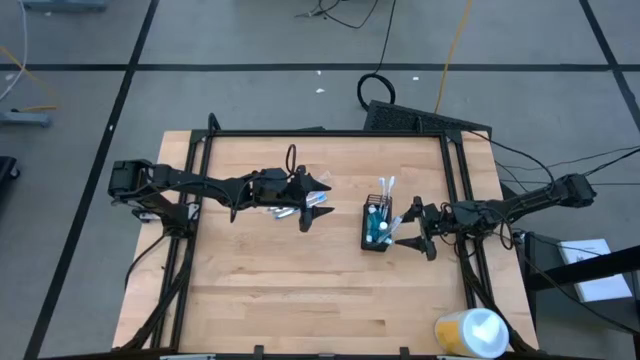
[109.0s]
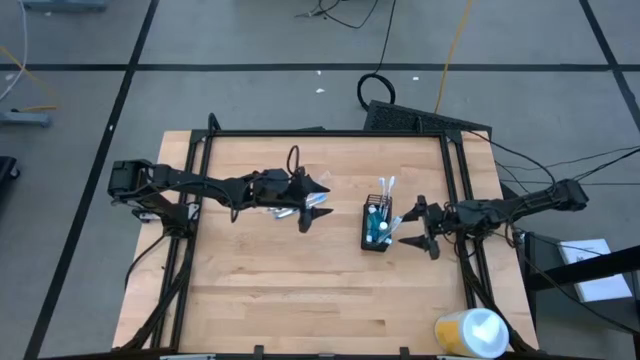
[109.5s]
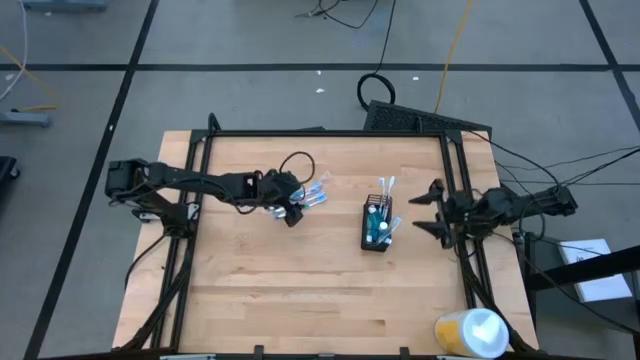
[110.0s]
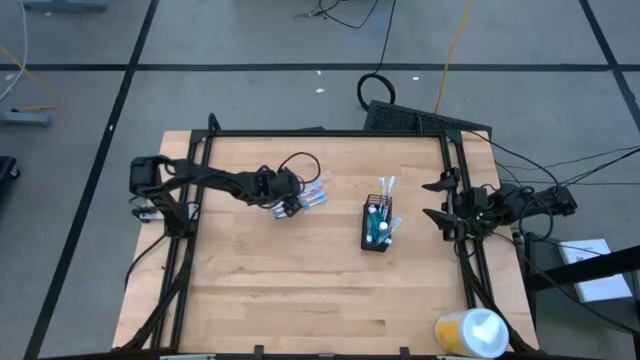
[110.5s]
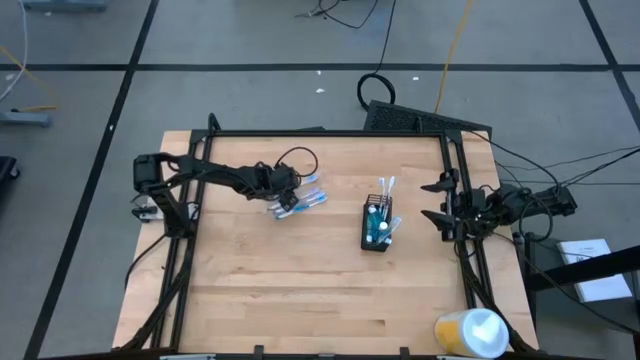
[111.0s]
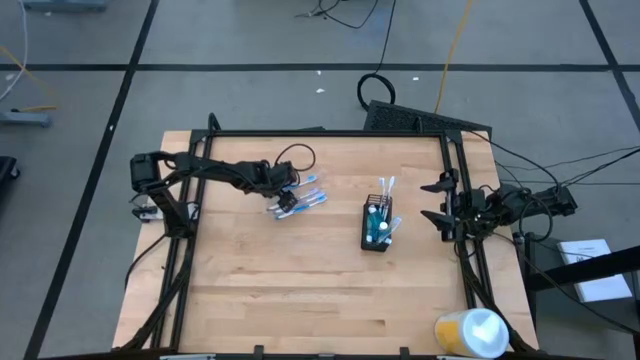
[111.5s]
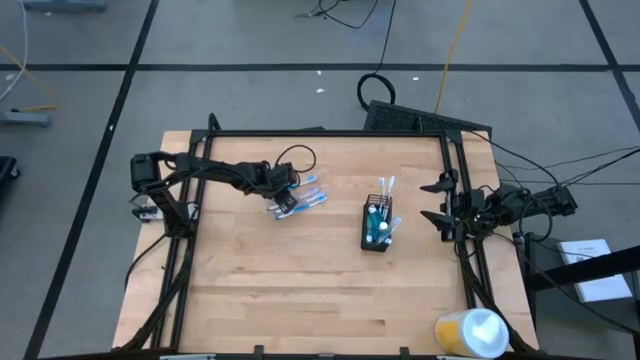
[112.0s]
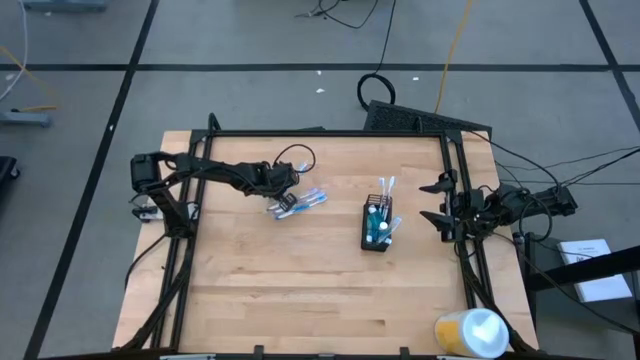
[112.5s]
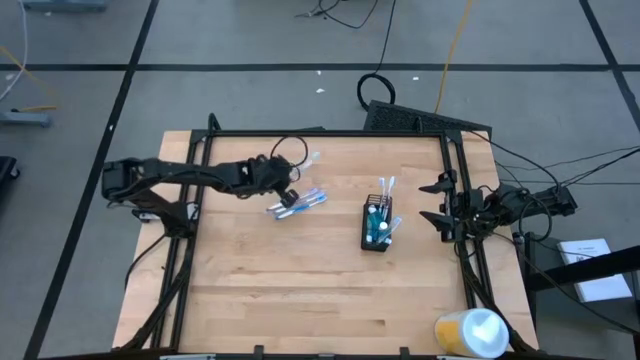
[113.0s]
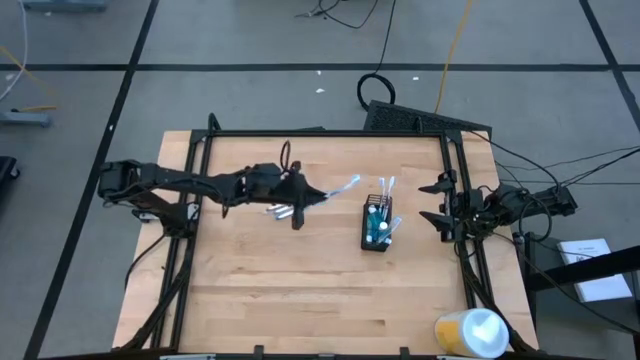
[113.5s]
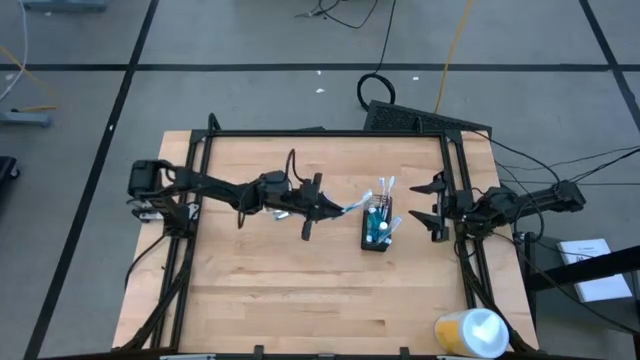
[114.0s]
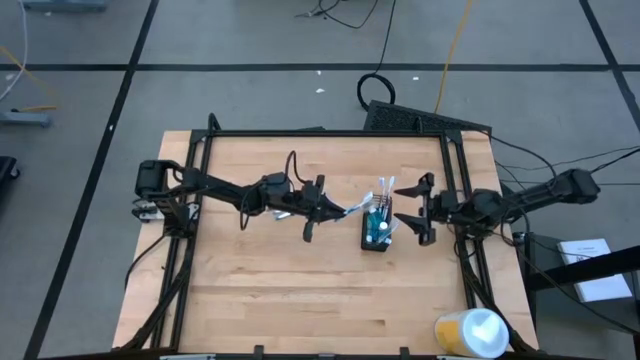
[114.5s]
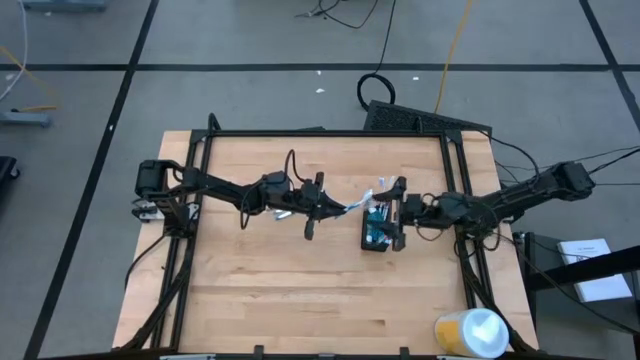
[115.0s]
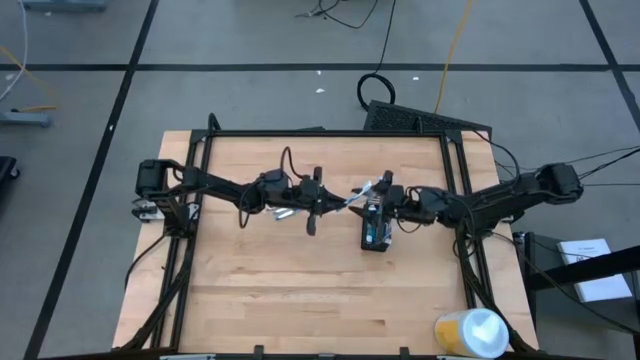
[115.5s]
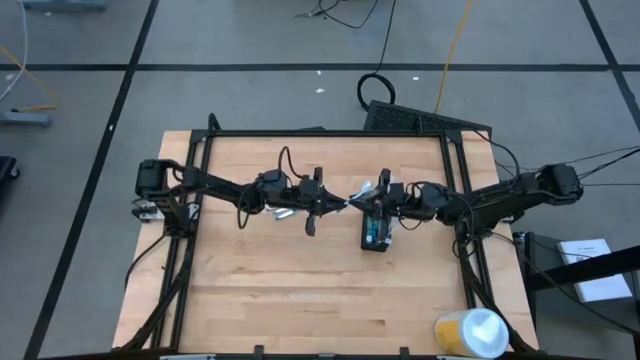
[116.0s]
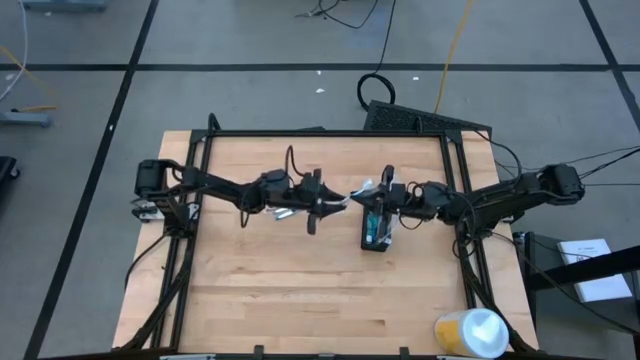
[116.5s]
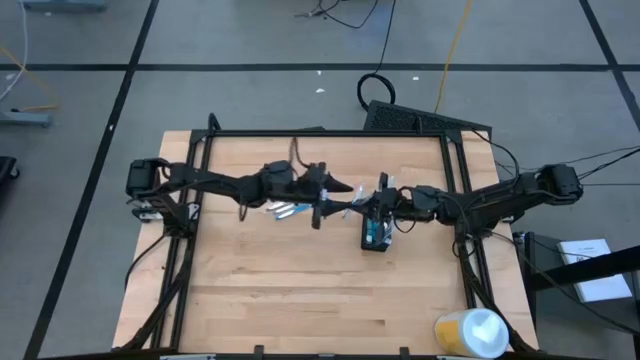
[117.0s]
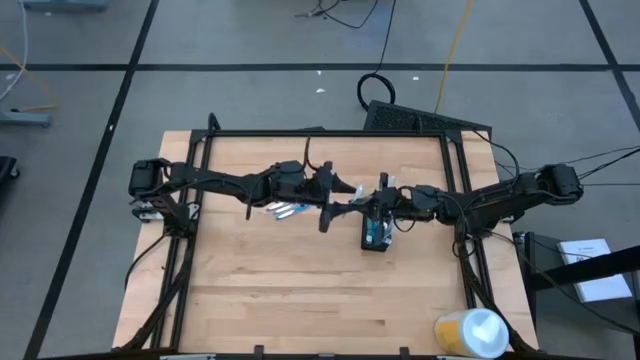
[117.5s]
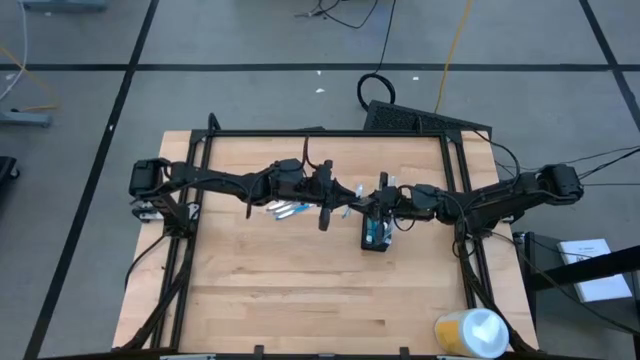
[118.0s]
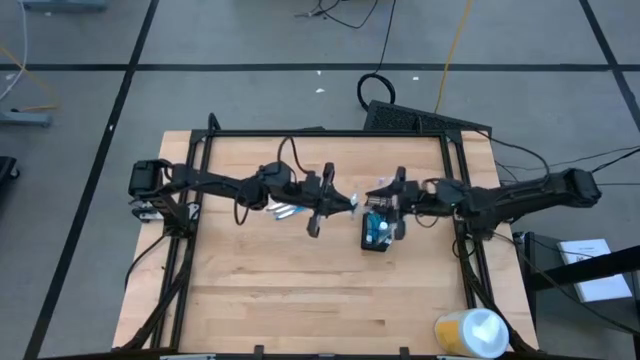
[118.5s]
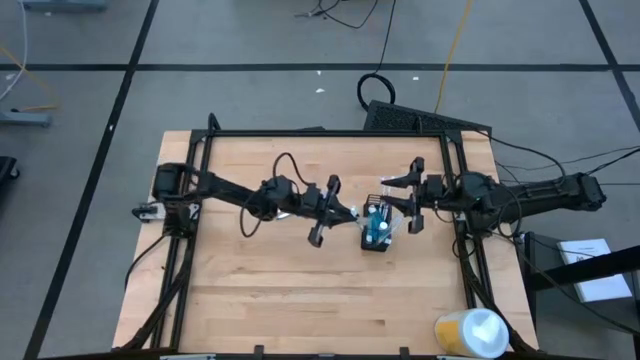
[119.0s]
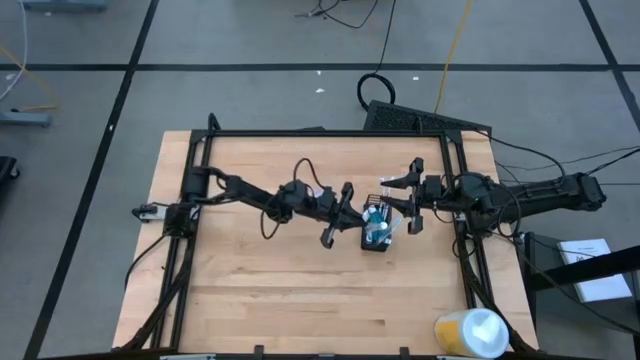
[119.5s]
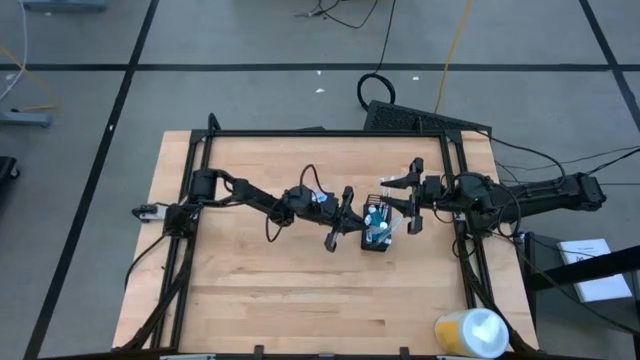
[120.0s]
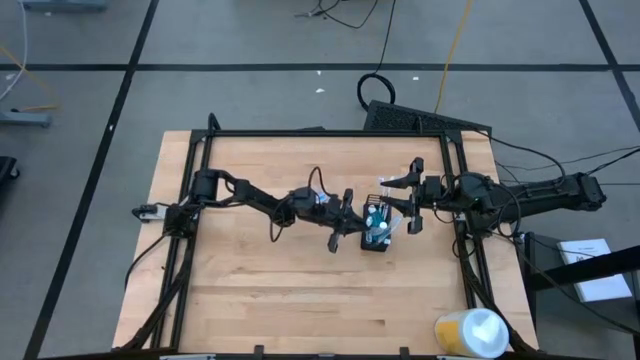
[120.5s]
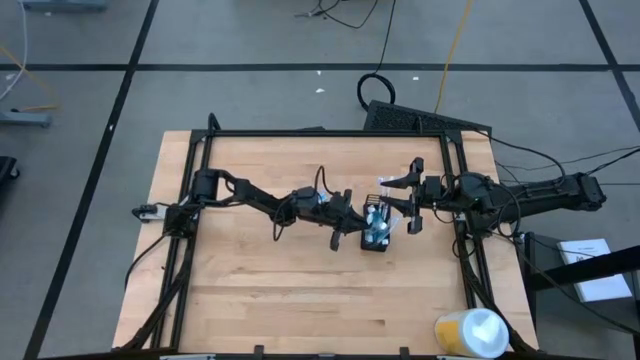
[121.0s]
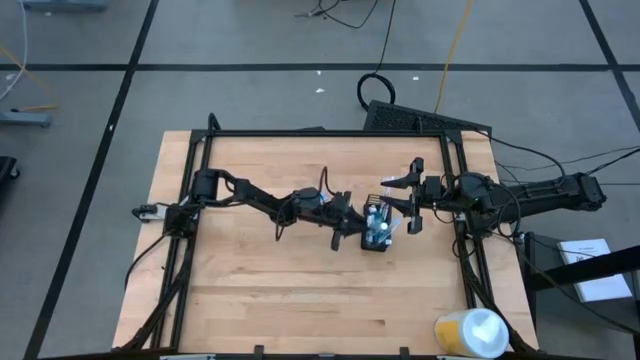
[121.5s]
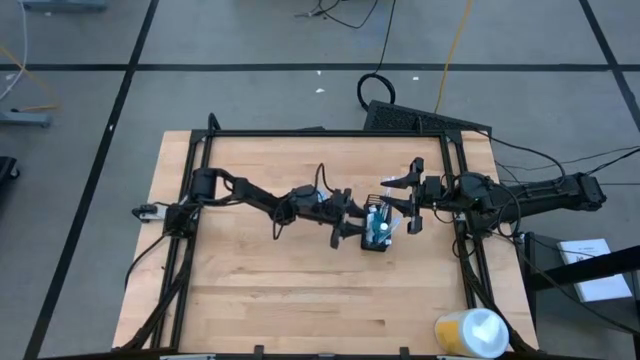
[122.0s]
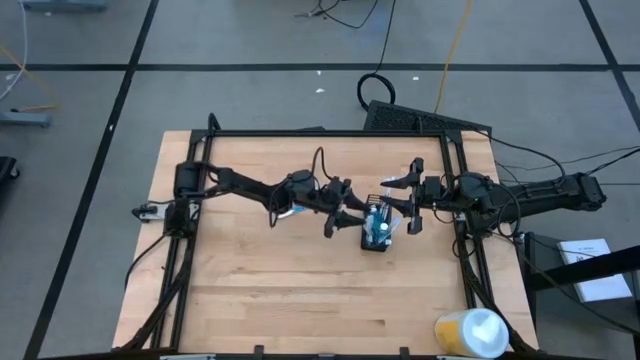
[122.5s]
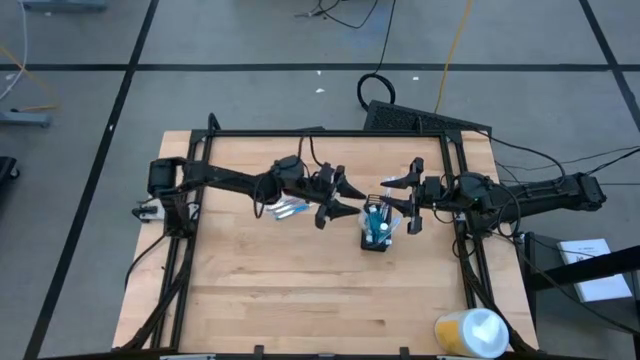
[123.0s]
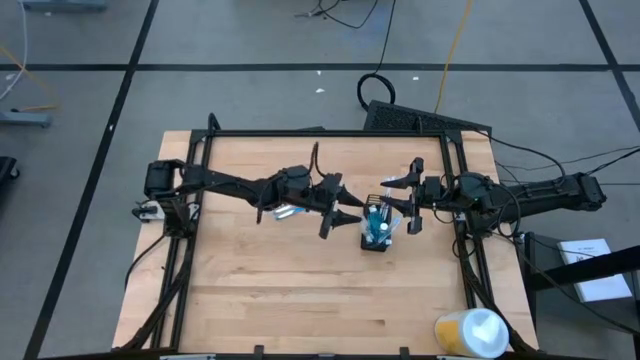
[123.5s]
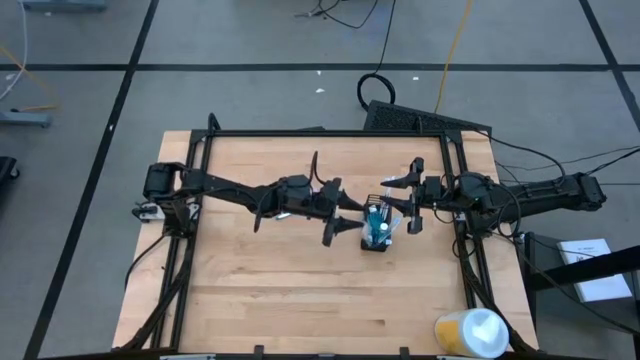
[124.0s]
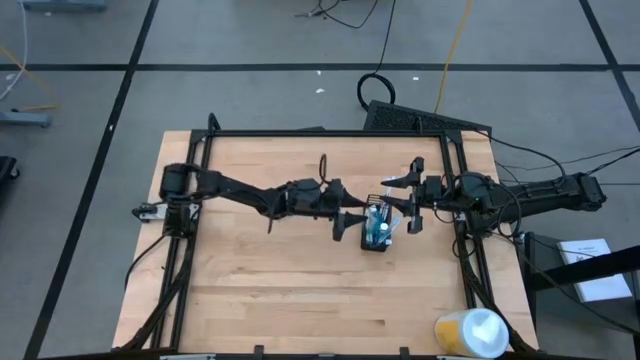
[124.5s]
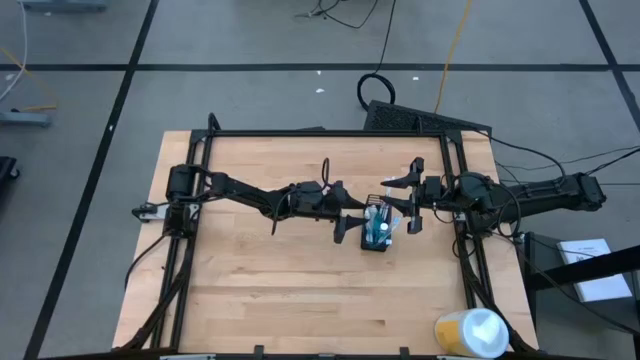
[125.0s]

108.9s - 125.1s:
Task: Pick & Place toothbrushing station
Put the blue toothbrush into the bottom section of the mesh organizer

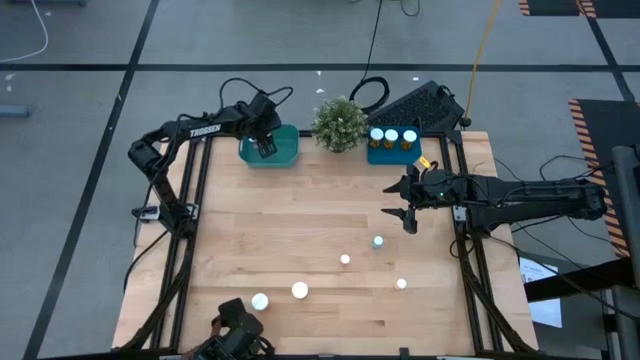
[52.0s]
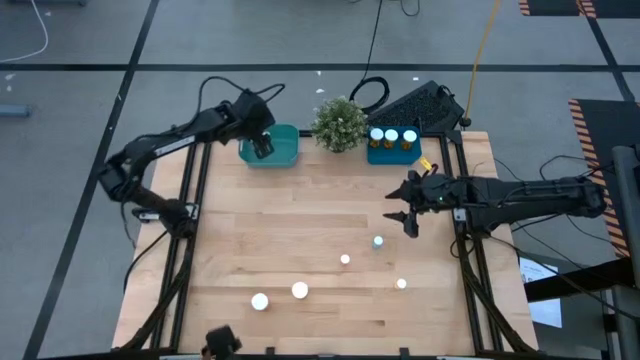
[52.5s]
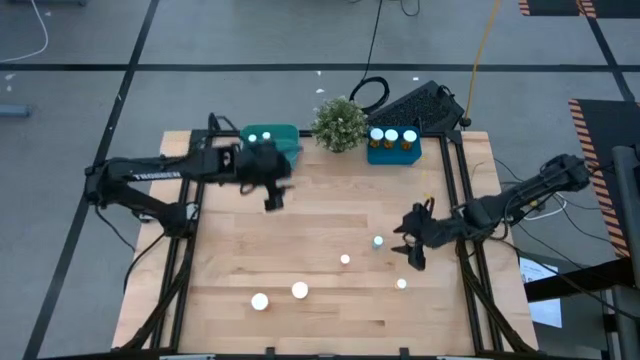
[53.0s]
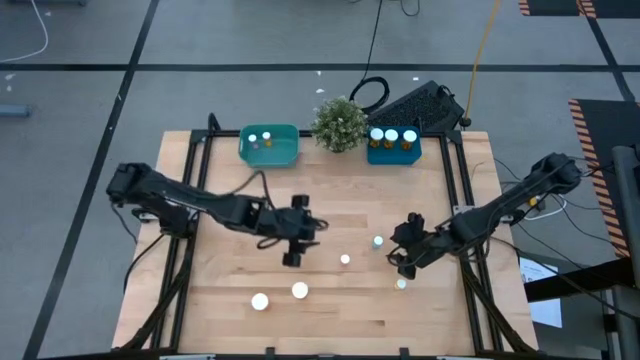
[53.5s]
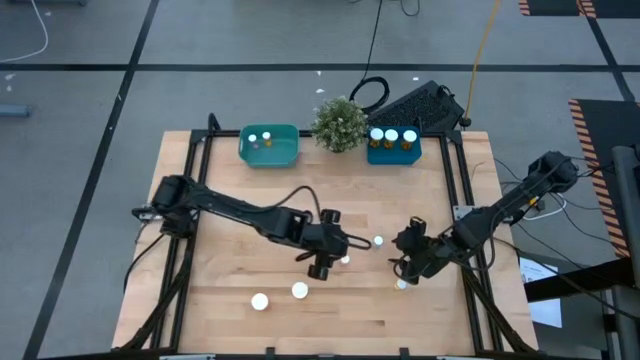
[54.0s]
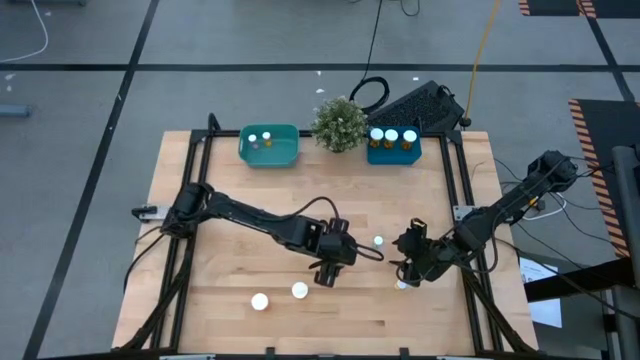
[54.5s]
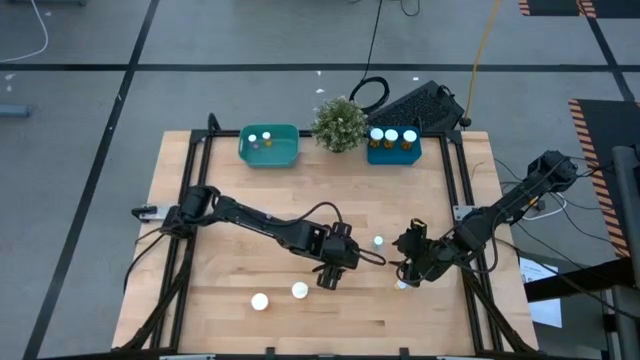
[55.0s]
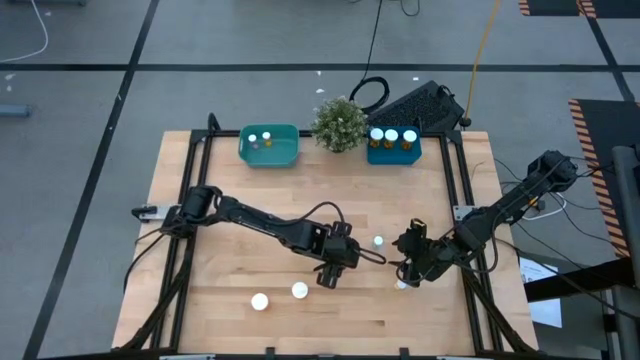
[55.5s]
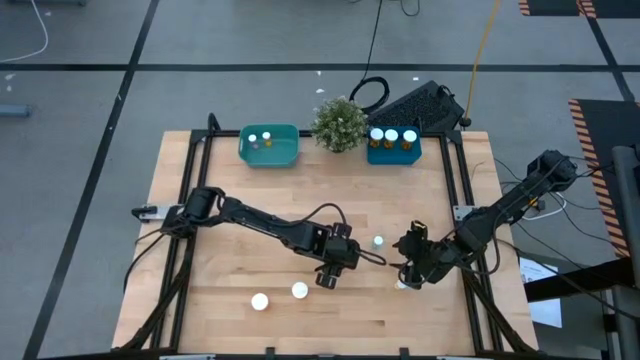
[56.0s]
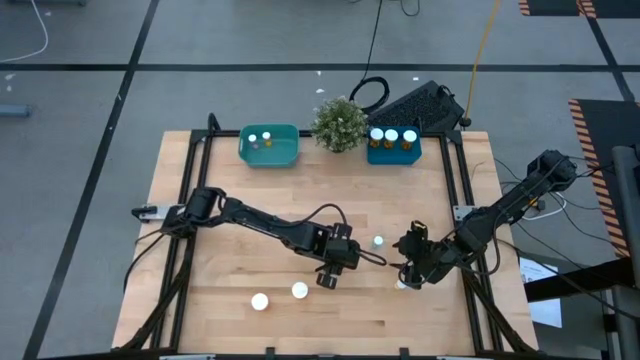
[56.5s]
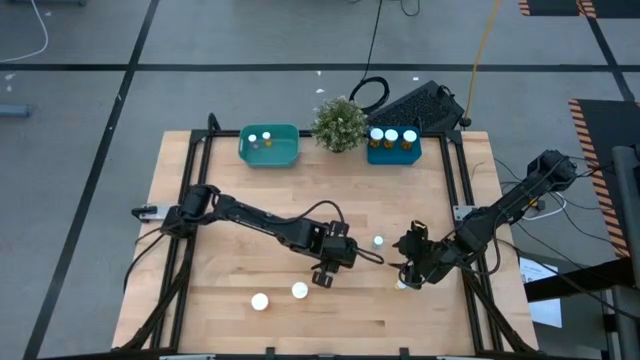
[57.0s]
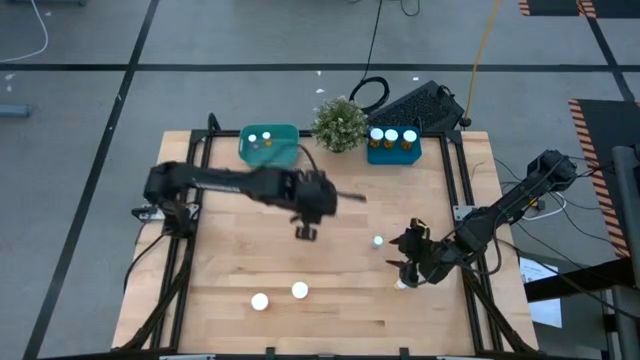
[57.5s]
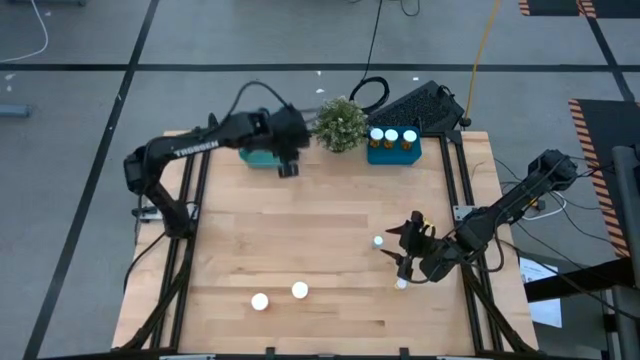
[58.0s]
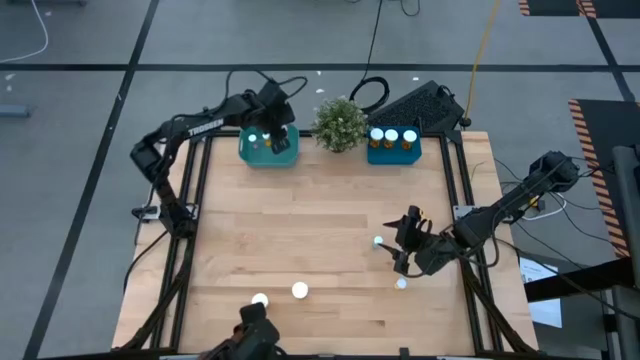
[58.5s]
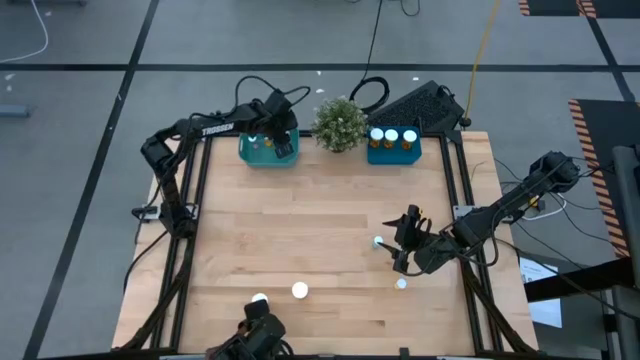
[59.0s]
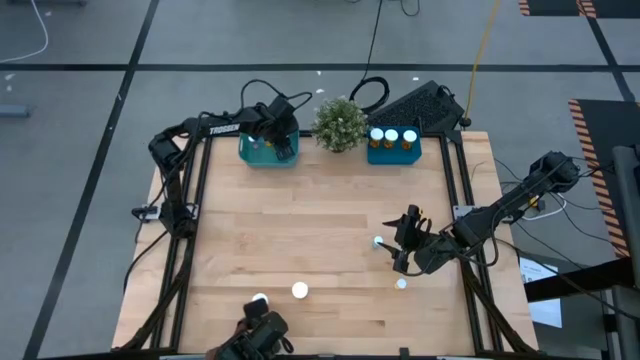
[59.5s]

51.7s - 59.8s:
Task: Pick and place medicine bottles into bin by pill shape (circle, oval)
Put the small pink pill bottle into the green bin
